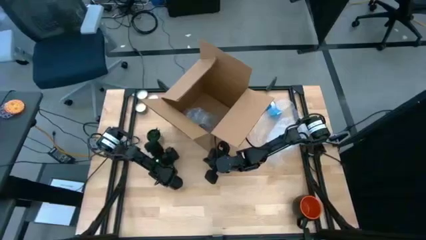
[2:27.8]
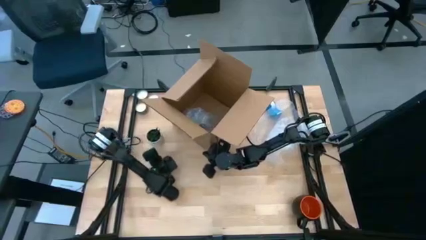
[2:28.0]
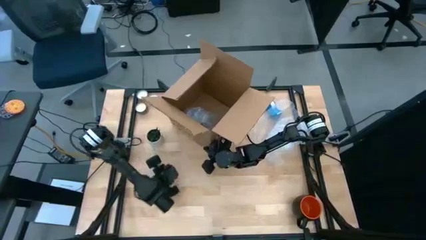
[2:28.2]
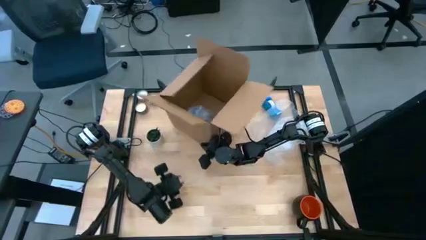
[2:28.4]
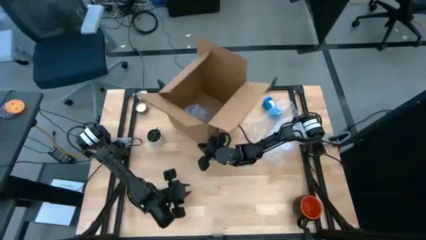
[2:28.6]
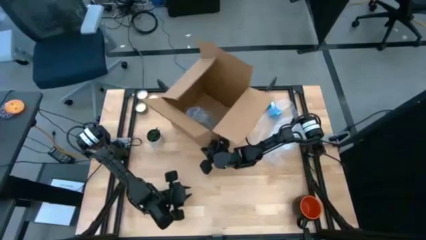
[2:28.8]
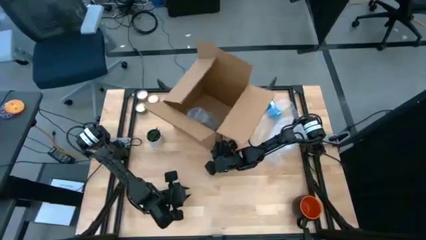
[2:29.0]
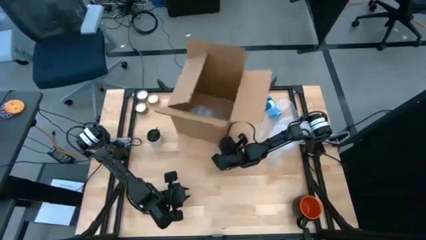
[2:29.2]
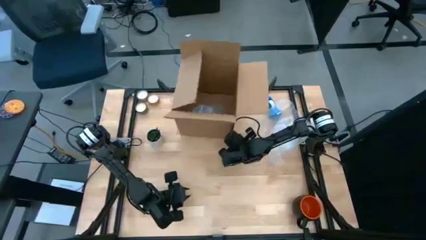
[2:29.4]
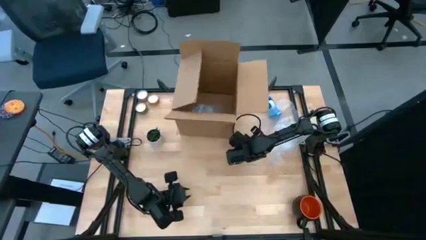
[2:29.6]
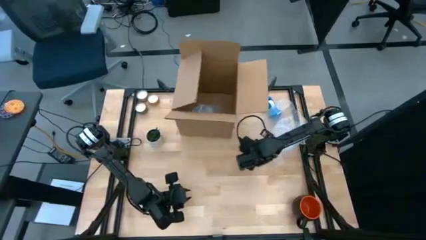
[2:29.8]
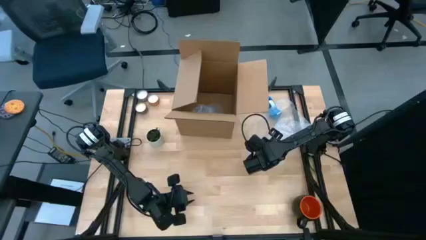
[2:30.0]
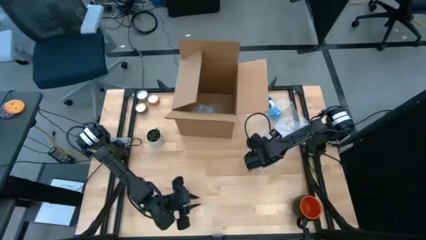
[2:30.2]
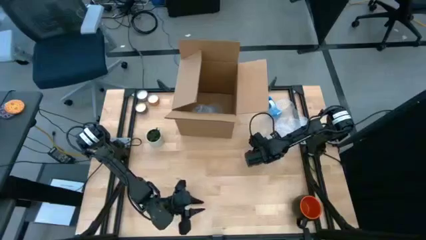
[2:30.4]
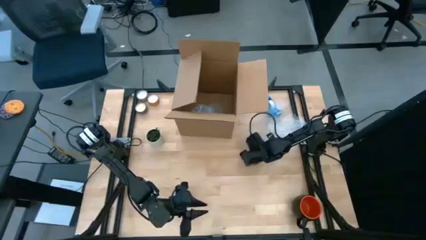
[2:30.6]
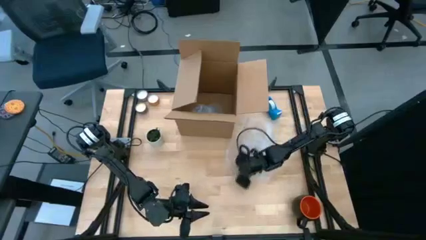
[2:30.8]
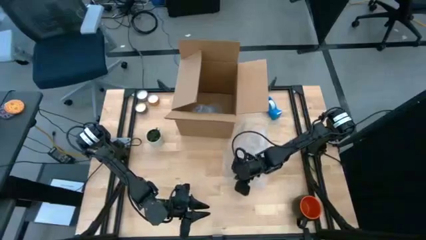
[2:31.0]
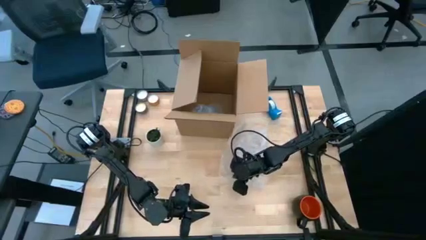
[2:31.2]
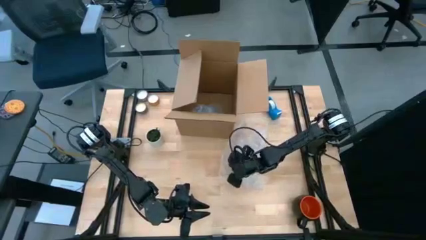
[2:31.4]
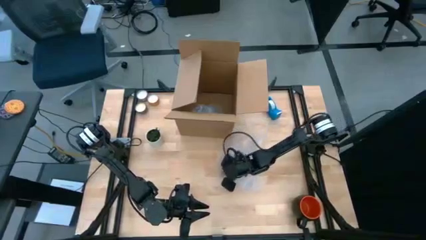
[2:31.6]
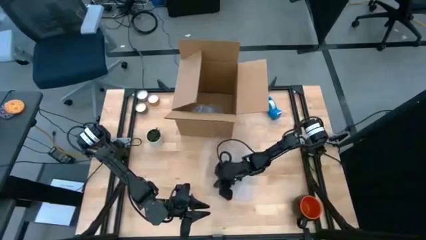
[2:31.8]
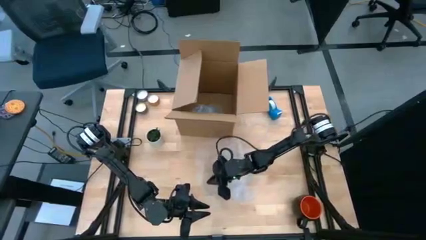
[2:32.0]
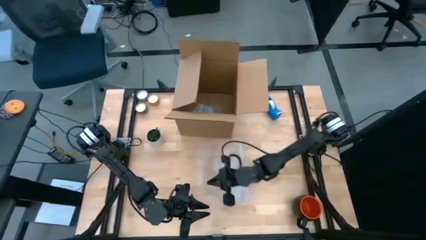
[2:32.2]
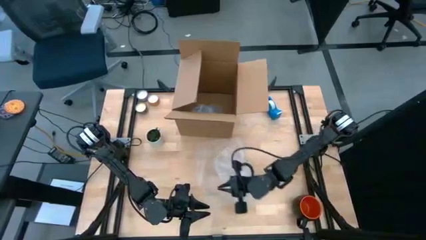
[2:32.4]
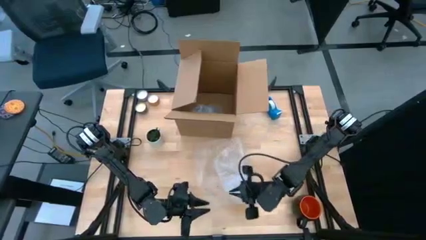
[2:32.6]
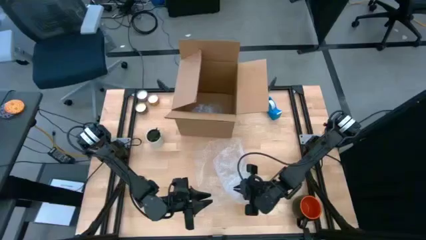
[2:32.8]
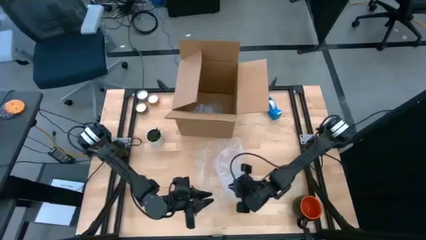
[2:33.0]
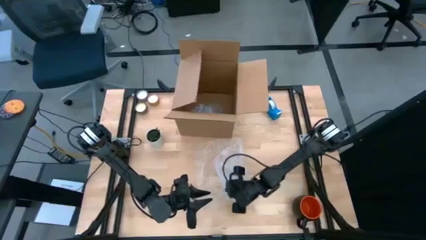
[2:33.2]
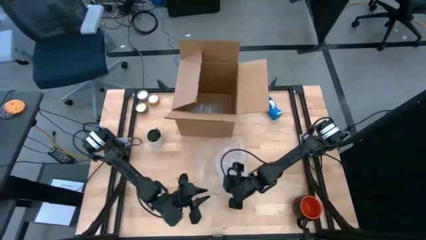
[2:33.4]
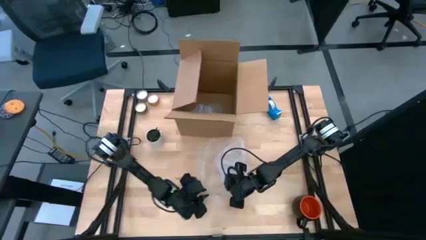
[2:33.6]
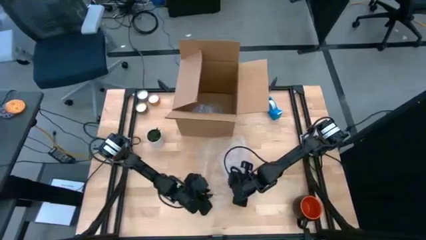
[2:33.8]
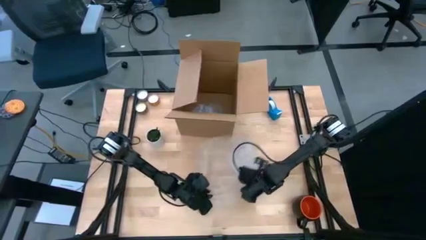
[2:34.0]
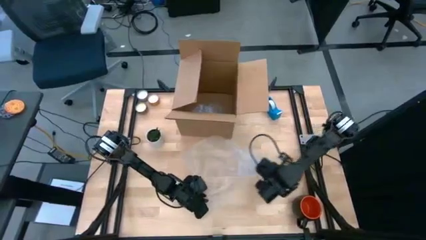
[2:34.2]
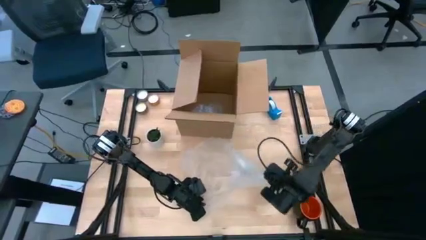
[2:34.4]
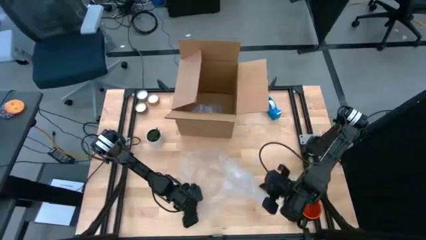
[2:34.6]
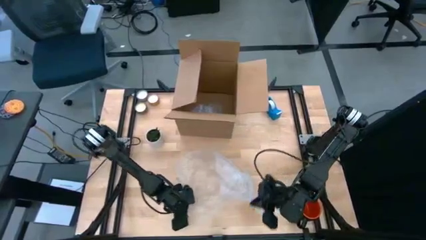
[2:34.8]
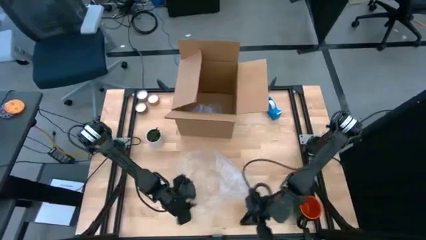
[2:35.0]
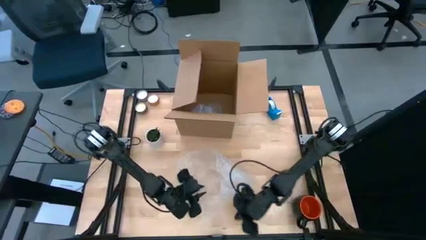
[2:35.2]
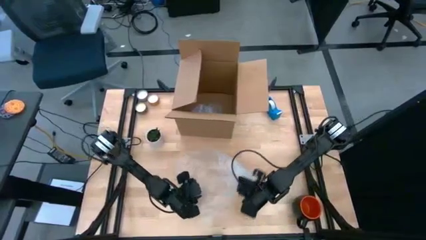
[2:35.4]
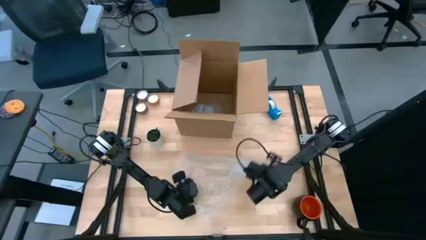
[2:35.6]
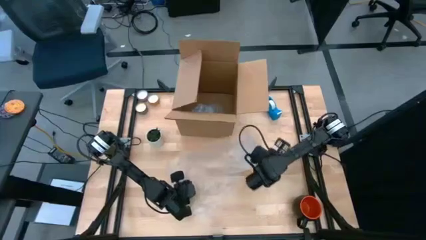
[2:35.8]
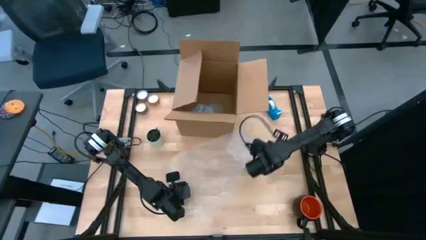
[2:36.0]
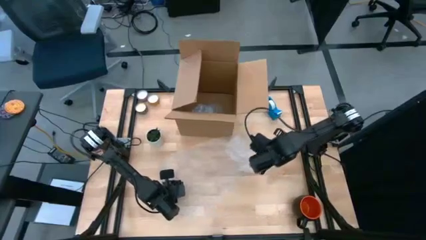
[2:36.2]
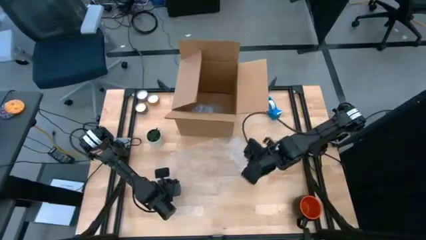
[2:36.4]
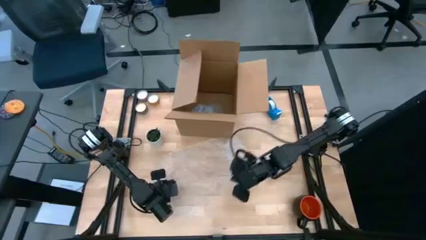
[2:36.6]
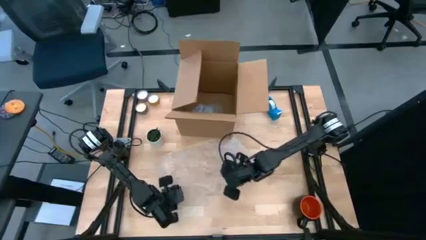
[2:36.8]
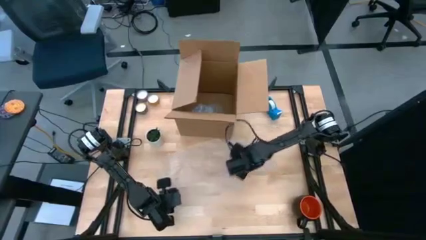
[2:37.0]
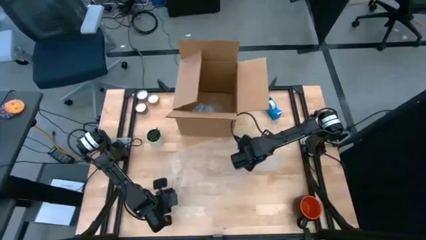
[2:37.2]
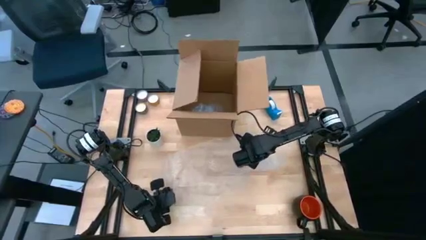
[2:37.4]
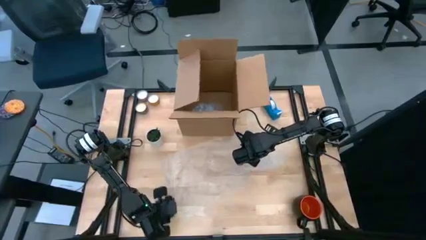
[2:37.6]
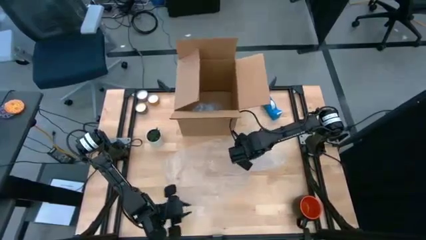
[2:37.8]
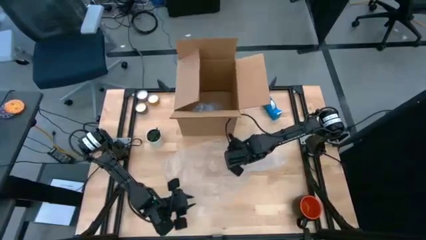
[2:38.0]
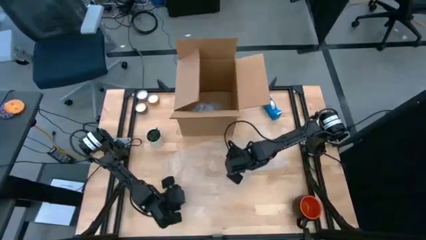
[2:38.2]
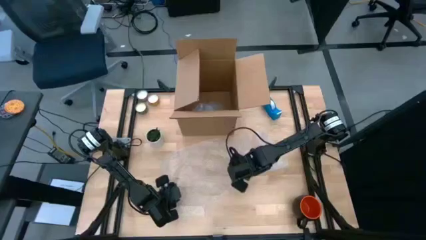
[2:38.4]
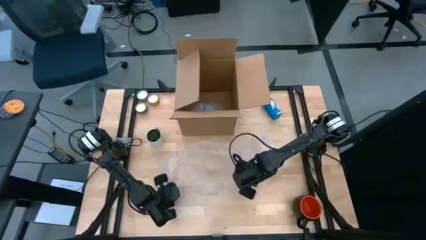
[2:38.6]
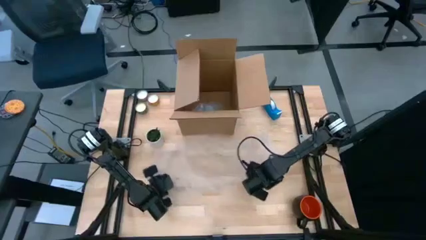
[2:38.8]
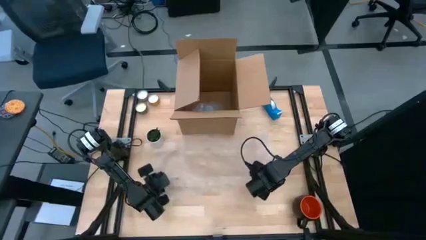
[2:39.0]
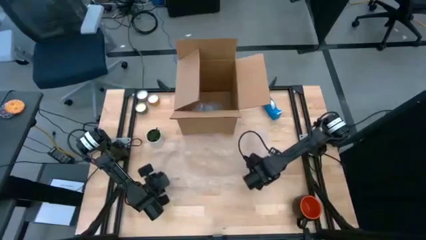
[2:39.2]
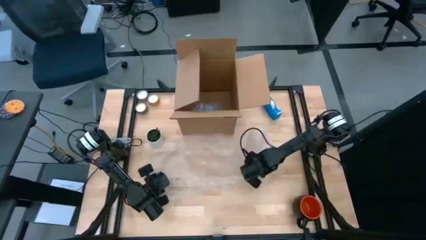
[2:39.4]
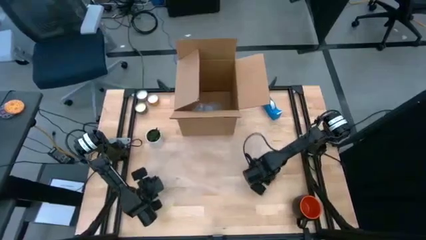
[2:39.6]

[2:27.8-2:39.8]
Task: wrap mug
Prepare the transparent bubble wrap
